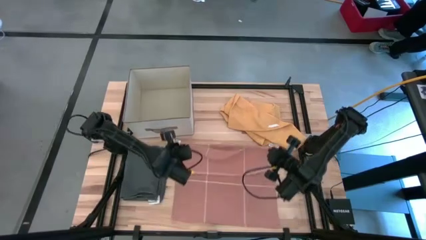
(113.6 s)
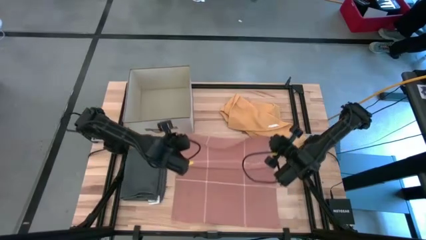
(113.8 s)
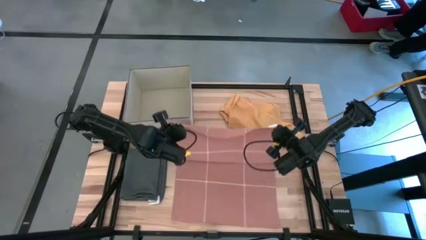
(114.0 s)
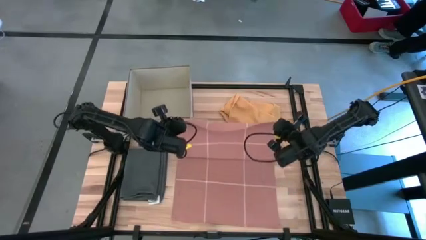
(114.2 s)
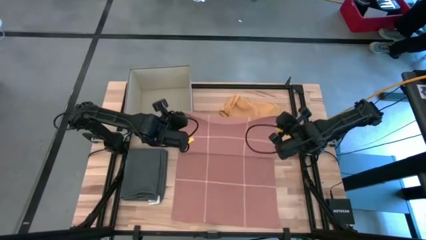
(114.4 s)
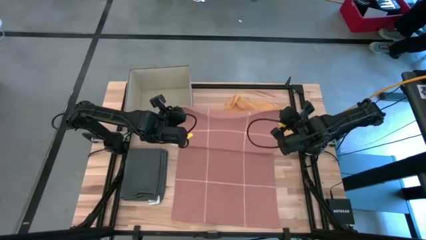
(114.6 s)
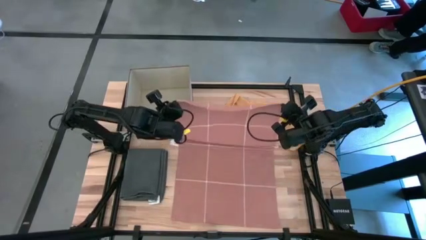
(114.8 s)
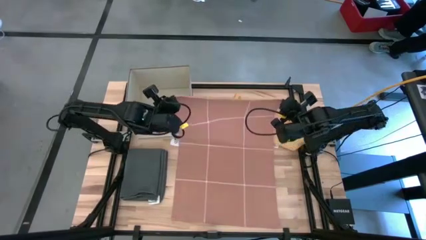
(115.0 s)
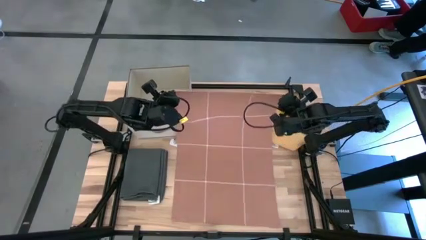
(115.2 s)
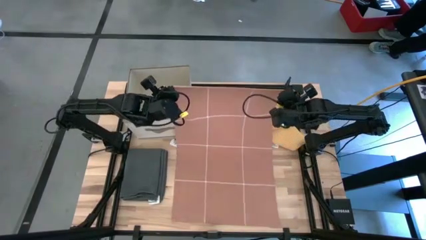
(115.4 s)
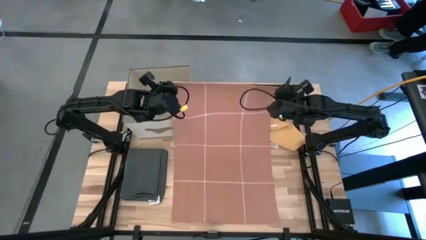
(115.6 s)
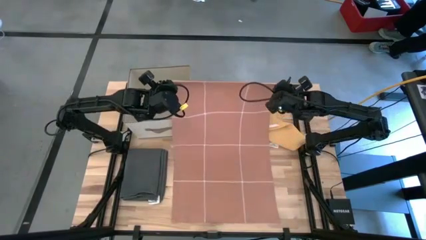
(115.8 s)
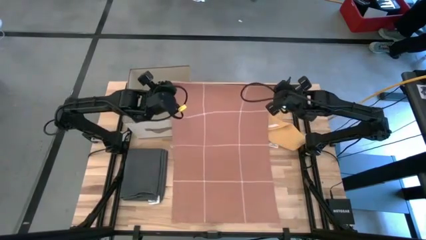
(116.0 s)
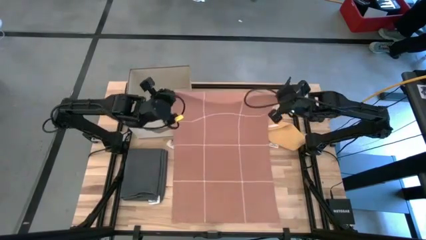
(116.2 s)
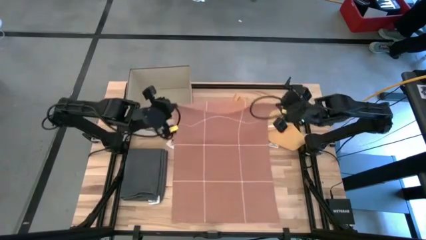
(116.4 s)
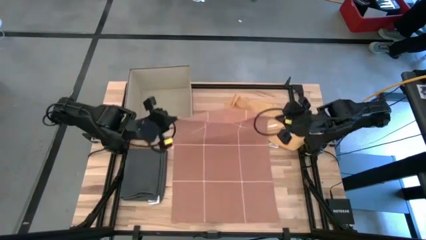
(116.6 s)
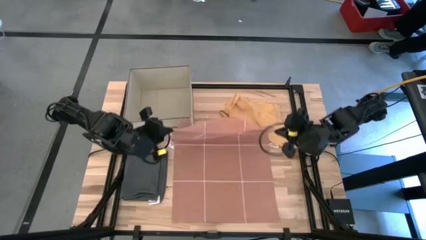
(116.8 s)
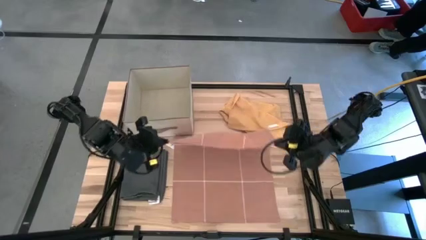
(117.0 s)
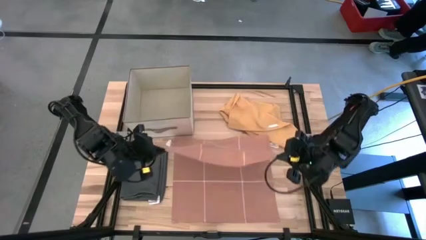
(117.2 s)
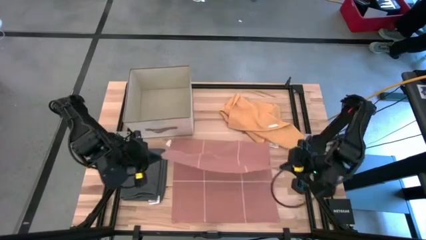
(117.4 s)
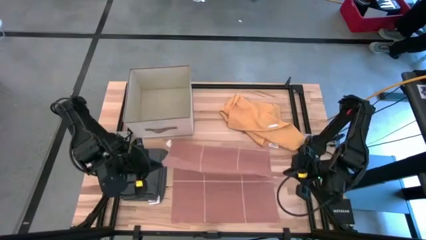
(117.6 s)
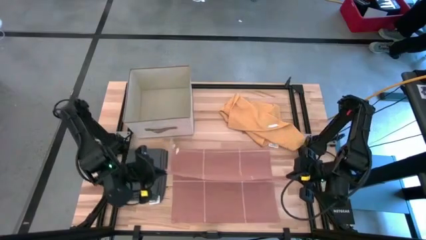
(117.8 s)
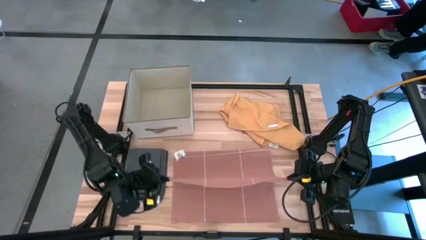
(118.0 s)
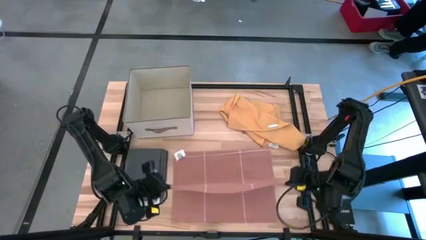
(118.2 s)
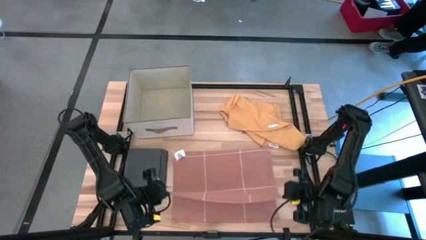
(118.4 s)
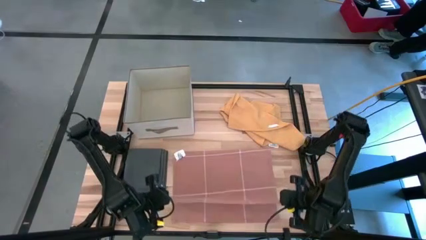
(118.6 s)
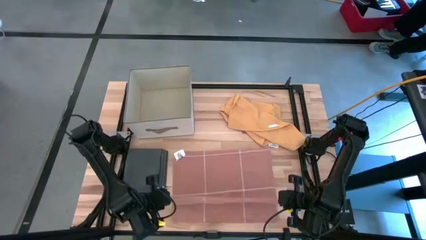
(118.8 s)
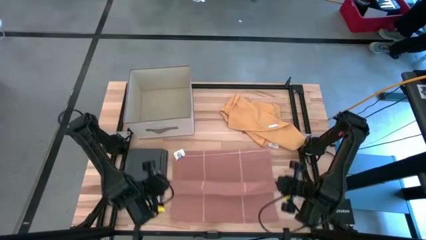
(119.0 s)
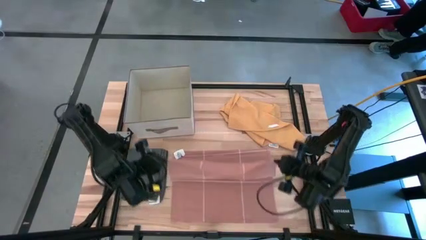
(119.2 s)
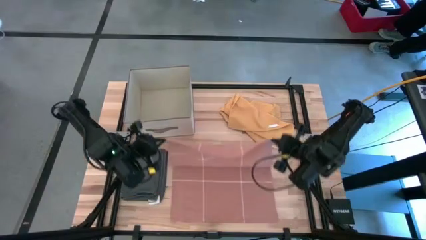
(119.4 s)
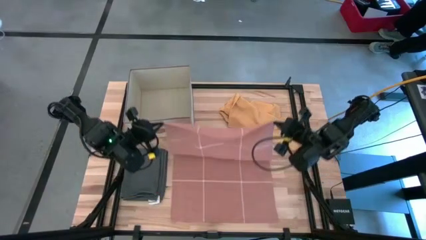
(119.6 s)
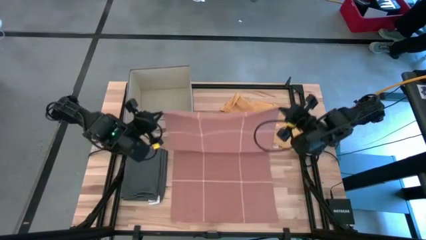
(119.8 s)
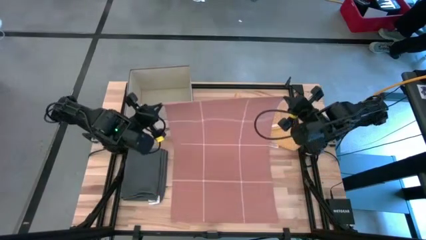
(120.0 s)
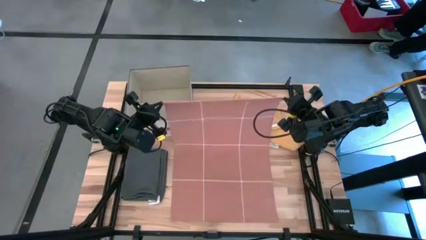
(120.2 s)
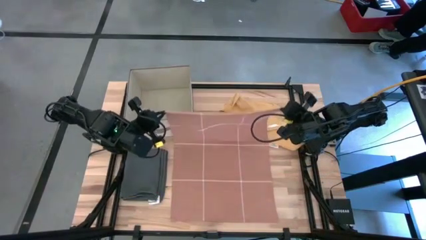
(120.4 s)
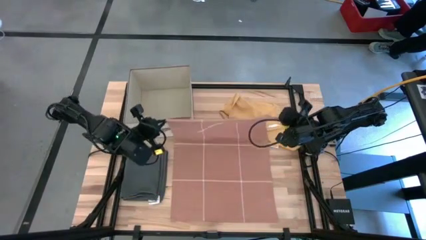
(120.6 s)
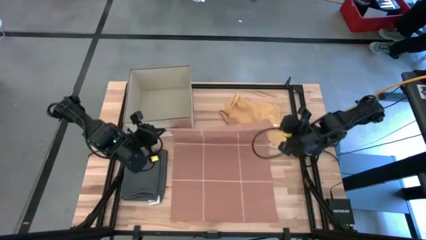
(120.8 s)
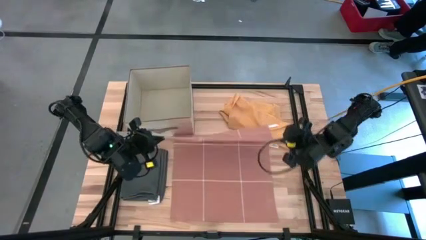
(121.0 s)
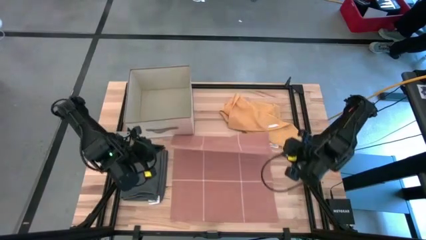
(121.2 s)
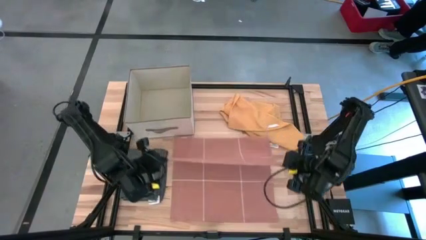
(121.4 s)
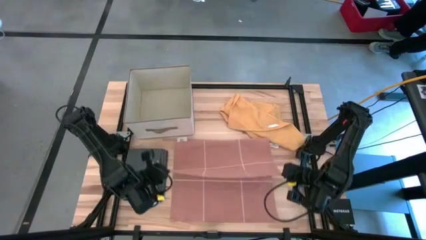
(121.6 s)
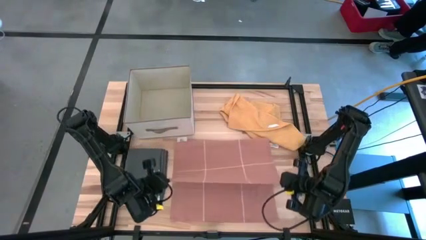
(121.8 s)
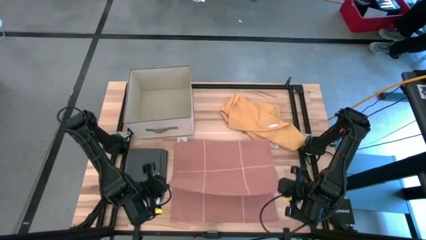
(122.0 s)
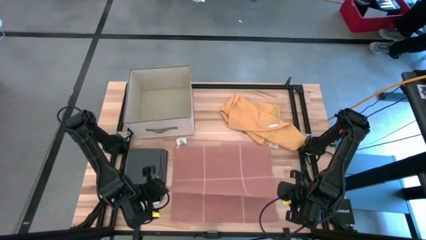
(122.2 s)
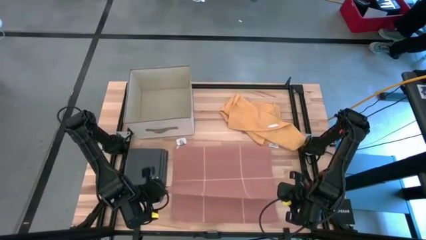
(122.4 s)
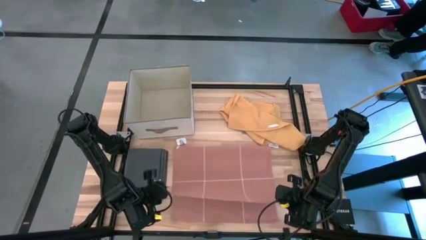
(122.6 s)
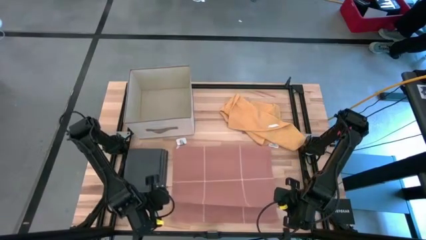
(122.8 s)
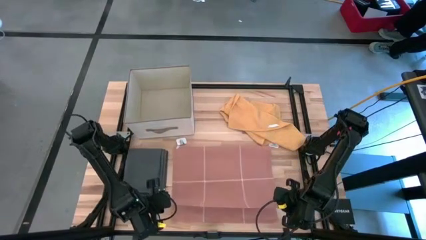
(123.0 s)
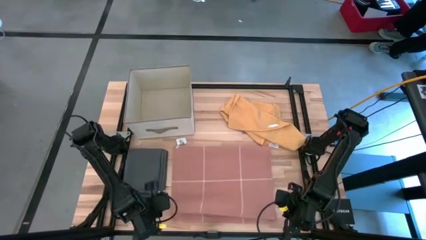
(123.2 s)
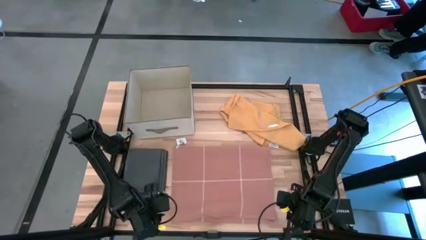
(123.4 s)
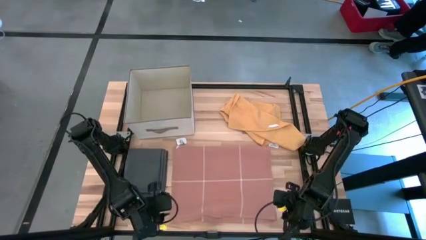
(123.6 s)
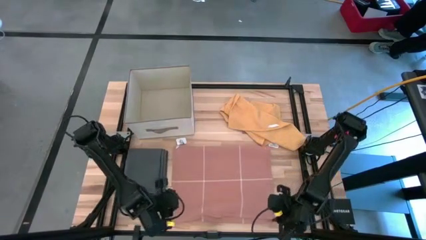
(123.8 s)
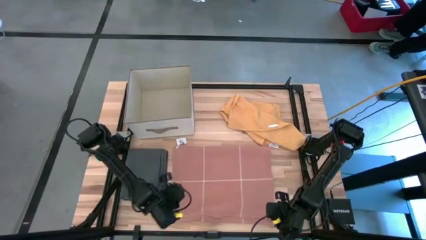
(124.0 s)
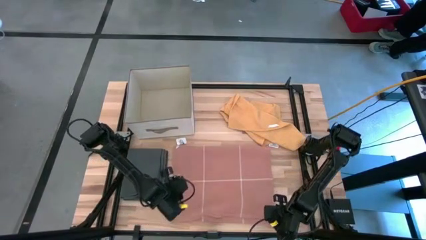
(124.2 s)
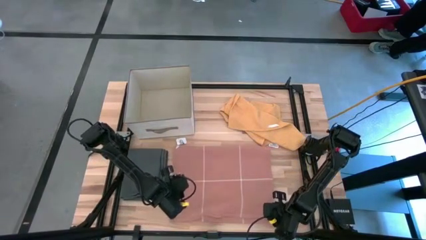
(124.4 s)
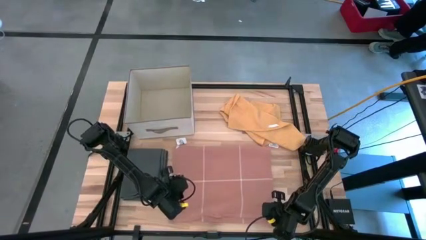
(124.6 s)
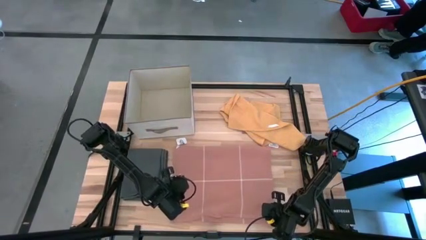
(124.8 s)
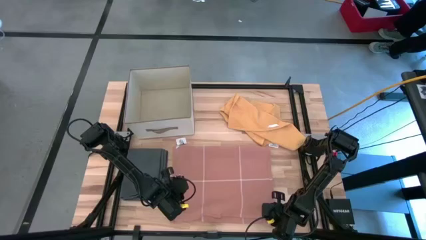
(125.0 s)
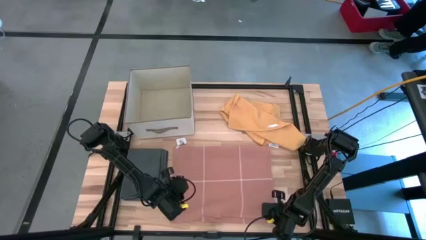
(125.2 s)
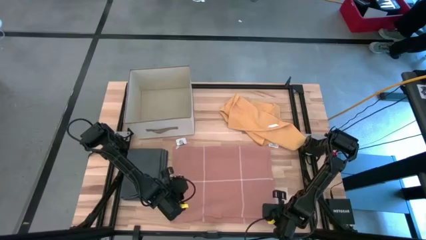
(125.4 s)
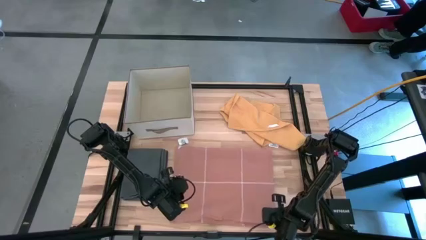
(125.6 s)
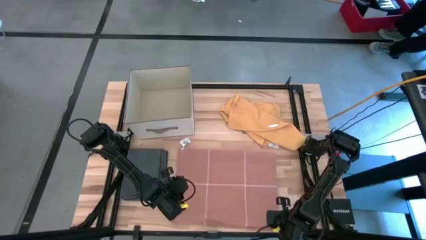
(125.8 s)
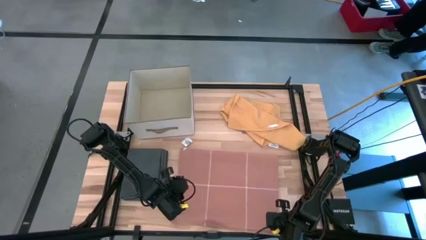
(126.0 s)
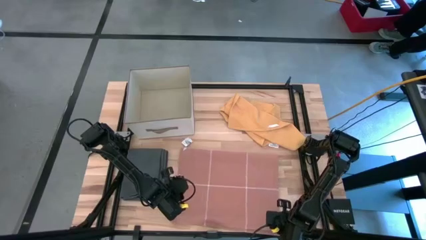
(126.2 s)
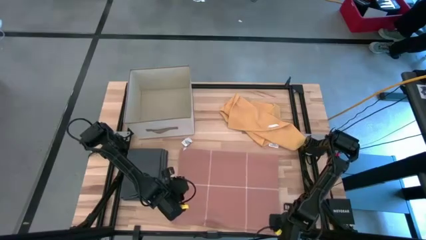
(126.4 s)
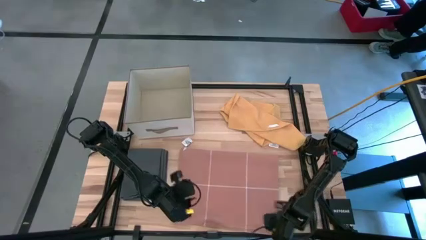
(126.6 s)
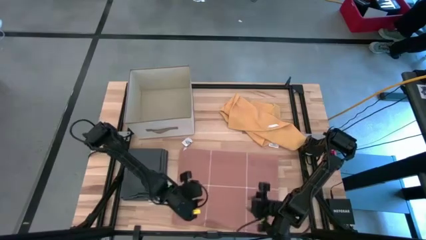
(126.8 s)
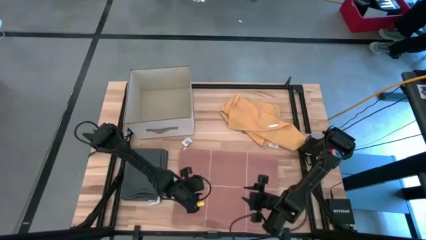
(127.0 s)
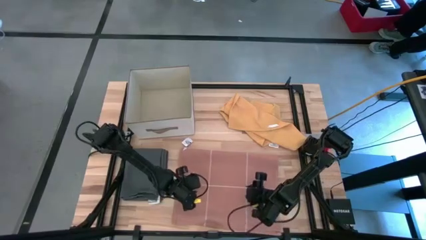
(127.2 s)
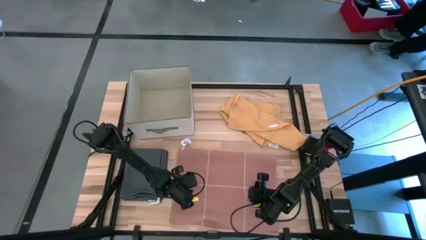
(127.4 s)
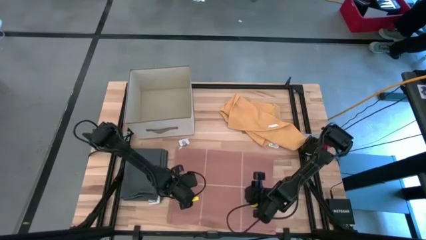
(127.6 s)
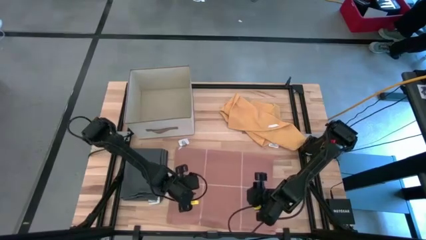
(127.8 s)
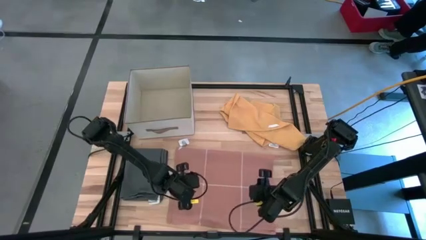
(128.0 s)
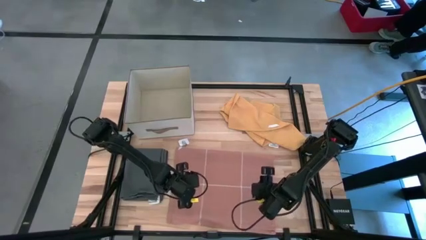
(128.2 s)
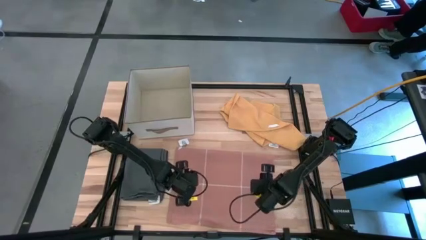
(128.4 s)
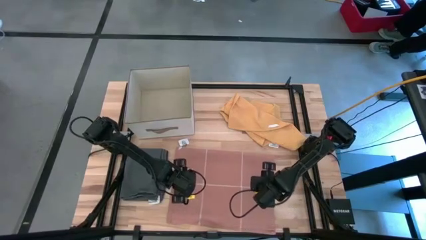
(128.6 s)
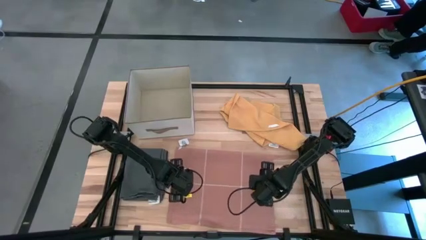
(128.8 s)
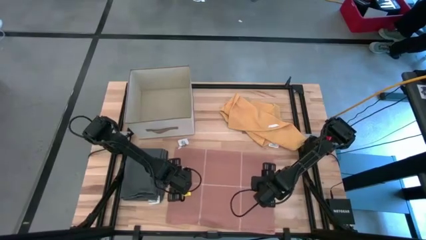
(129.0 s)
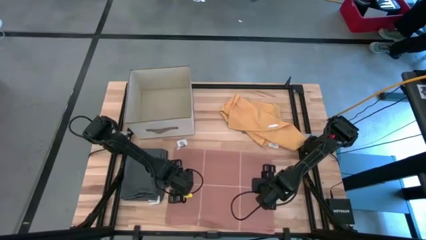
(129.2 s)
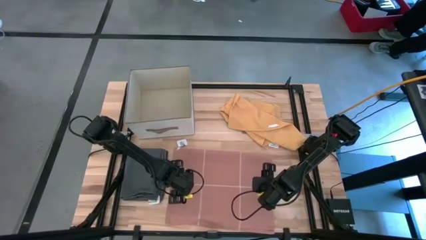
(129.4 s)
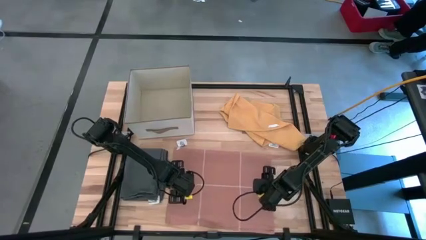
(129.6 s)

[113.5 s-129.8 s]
Task: Fold towel
Fold the light orange towel
